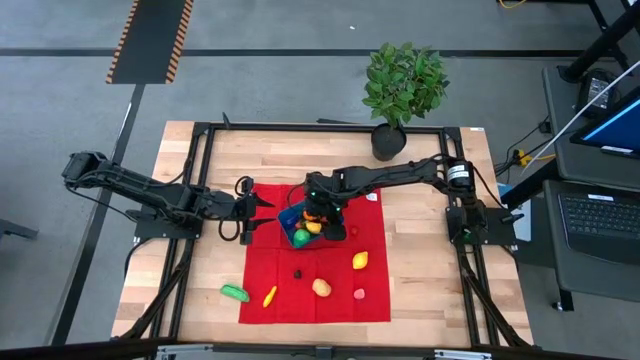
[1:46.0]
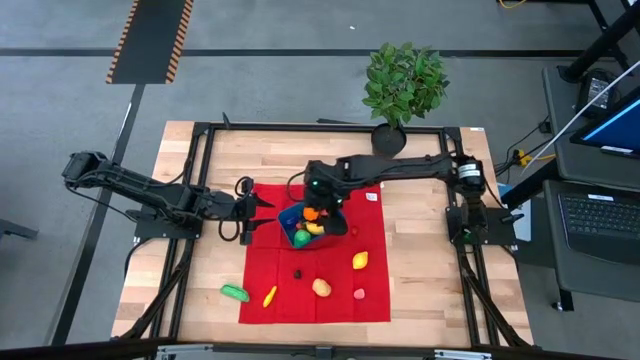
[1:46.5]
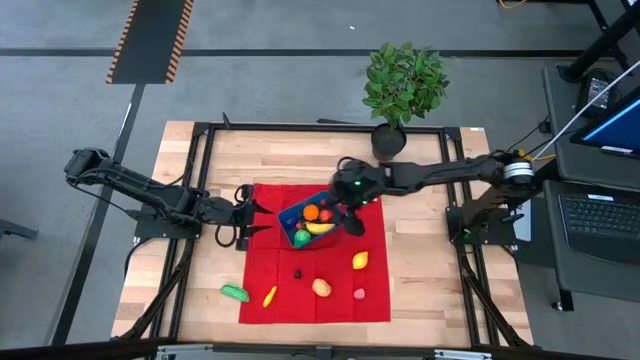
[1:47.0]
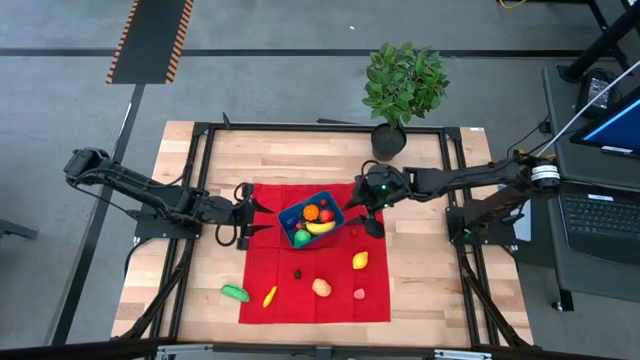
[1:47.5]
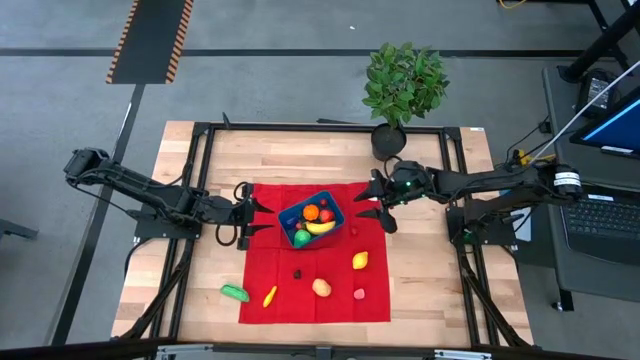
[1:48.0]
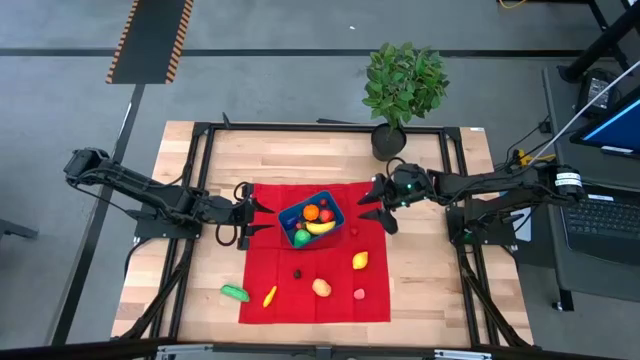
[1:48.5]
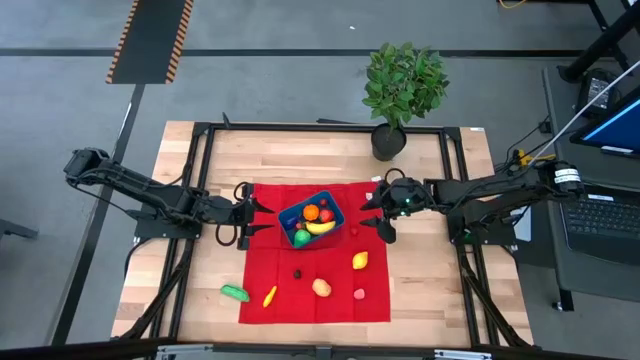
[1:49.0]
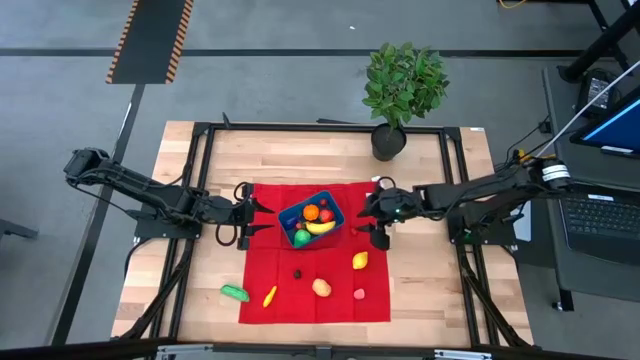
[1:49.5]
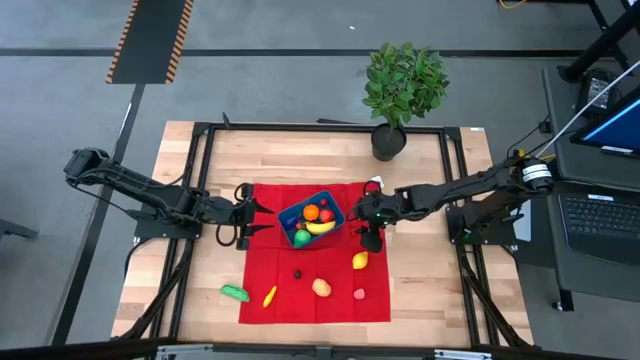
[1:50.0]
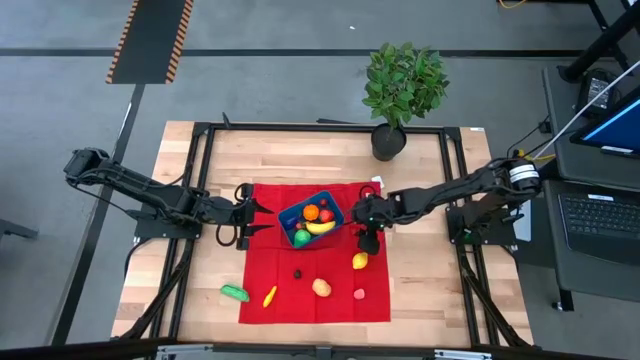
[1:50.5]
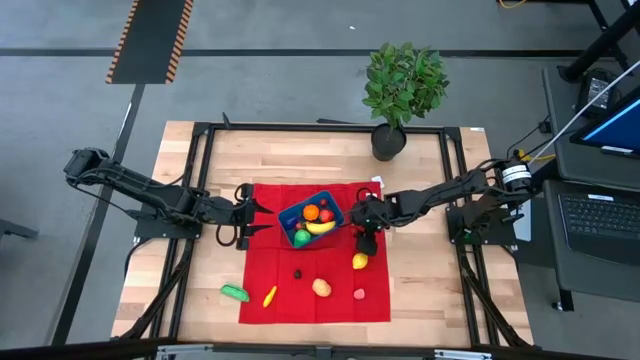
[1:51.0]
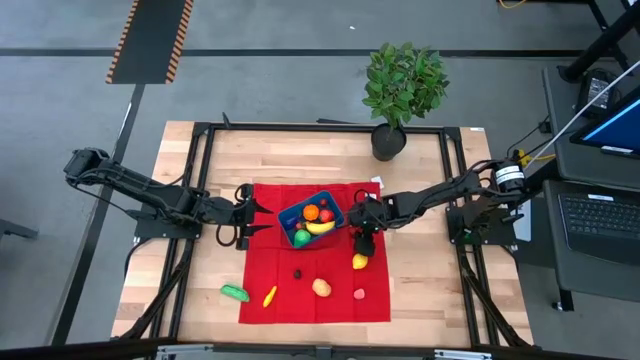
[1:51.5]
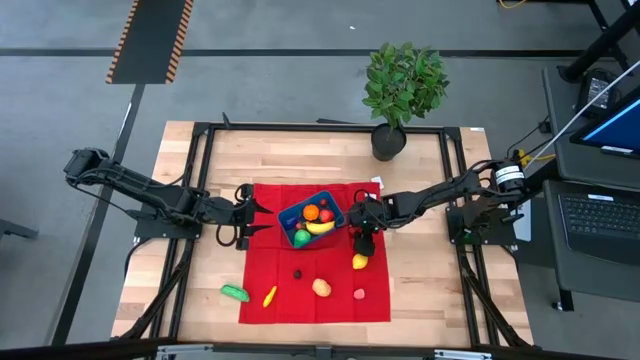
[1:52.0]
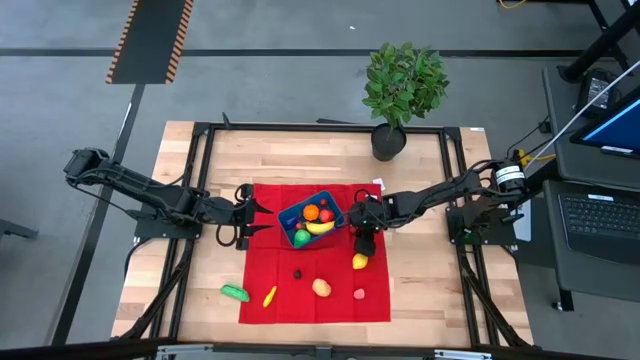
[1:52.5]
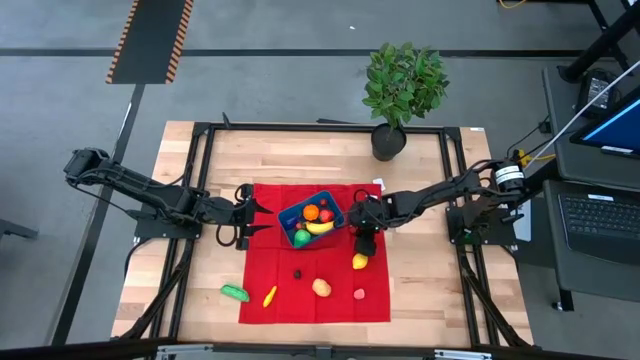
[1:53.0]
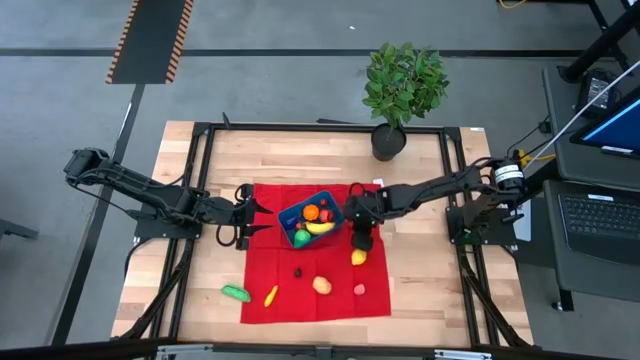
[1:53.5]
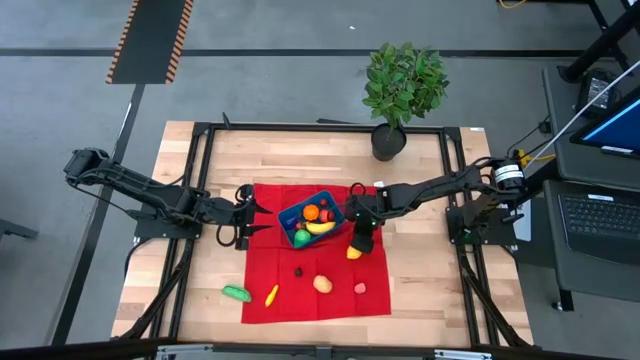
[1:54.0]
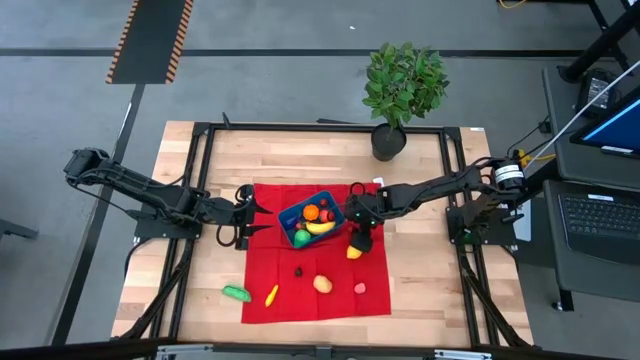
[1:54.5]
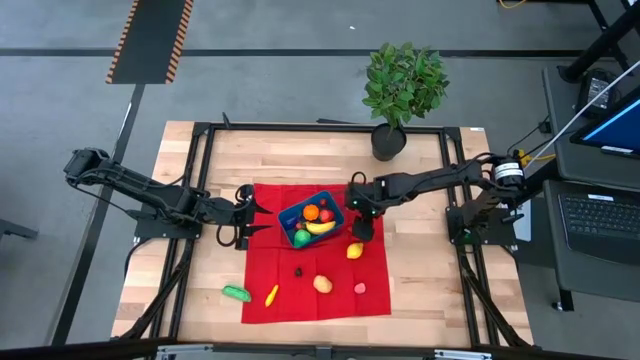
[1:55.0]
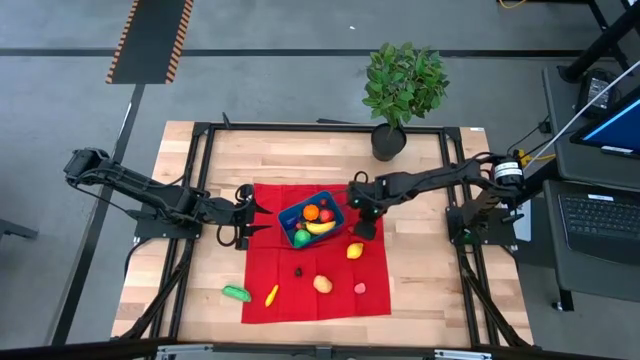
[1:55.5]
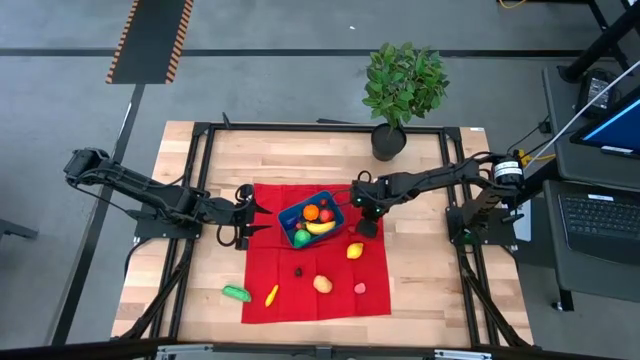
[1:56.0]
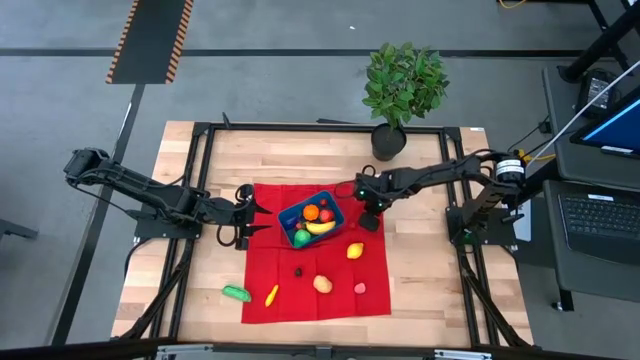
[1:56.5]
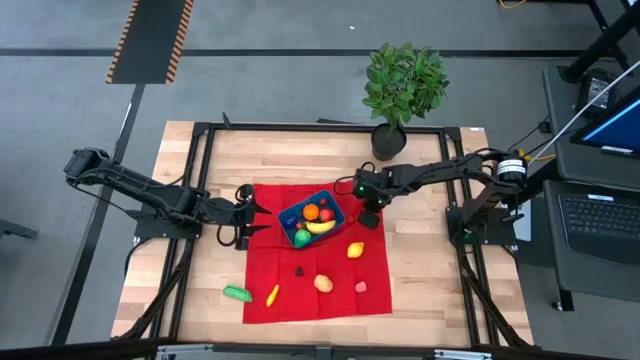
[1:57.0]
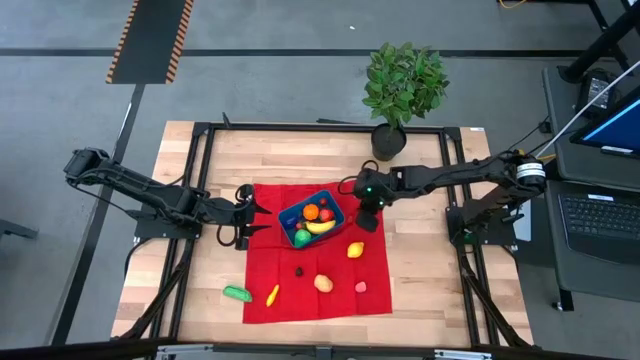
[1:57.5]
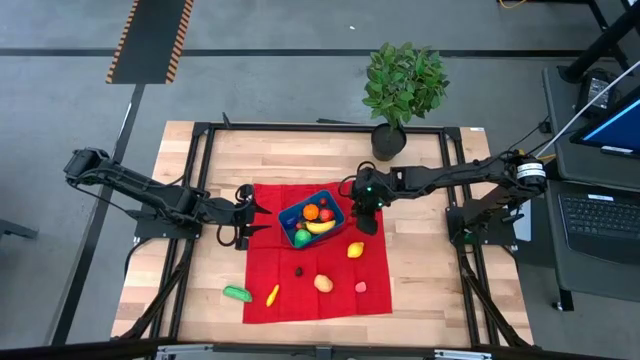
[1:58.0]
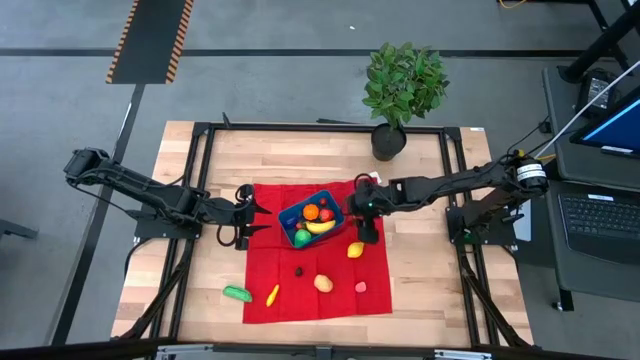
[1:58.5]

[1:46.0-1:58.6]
Task: Pick and placing Produce into tupperware
Put the raspberry into the blue bin

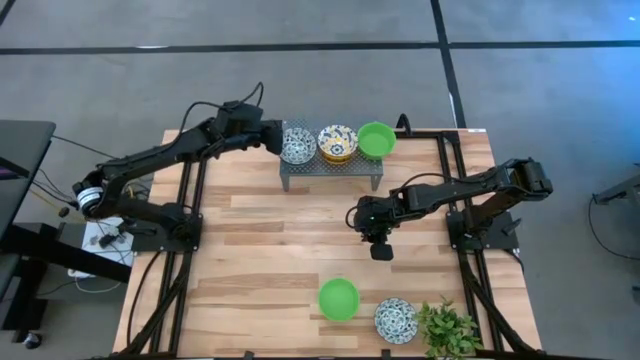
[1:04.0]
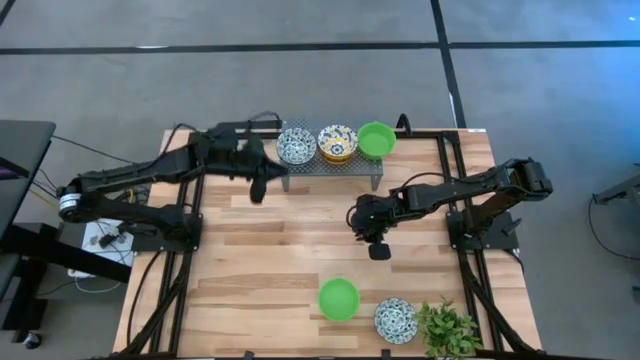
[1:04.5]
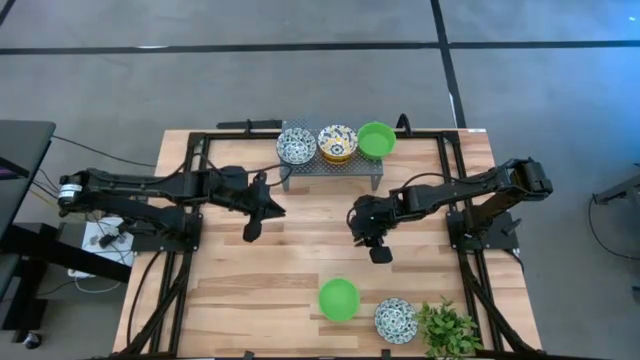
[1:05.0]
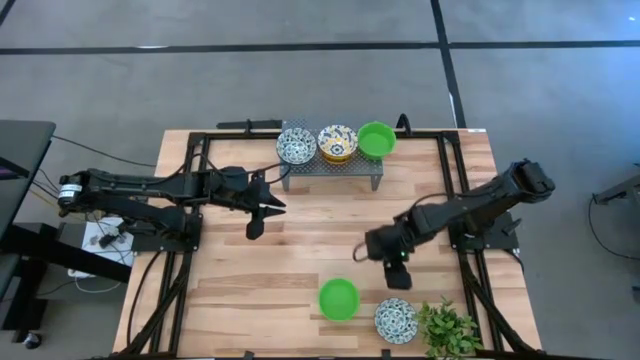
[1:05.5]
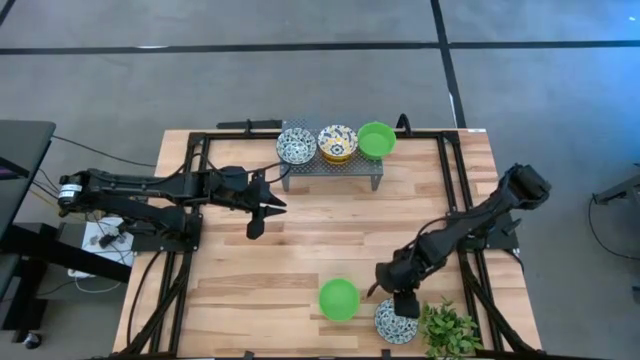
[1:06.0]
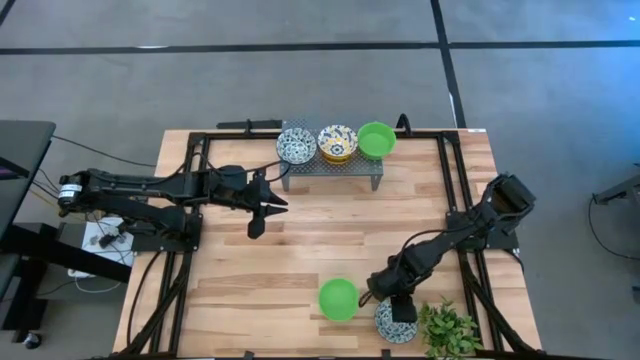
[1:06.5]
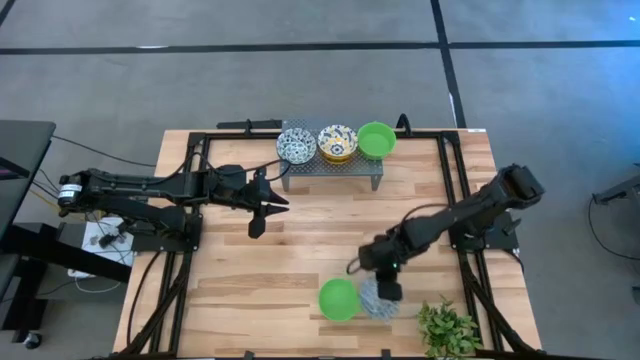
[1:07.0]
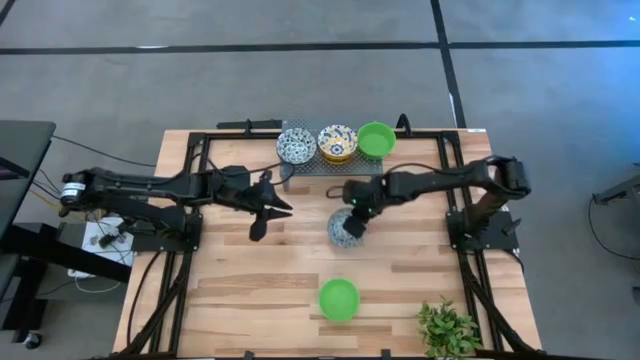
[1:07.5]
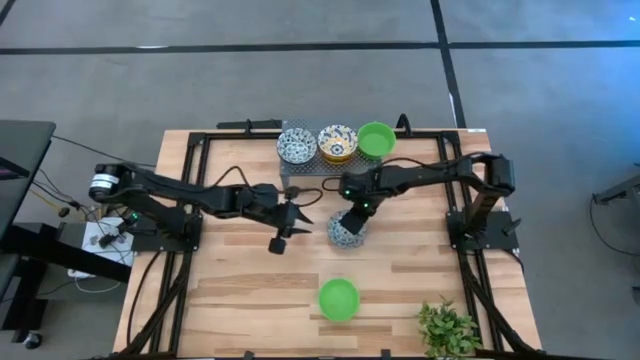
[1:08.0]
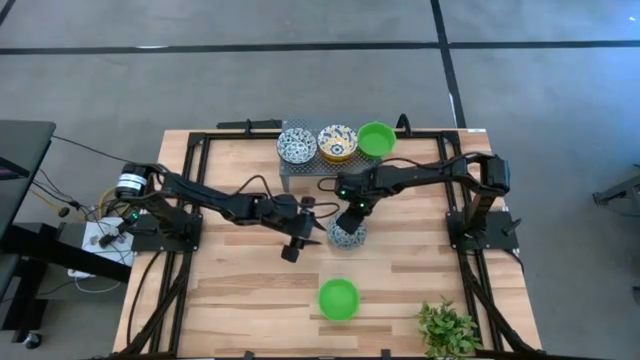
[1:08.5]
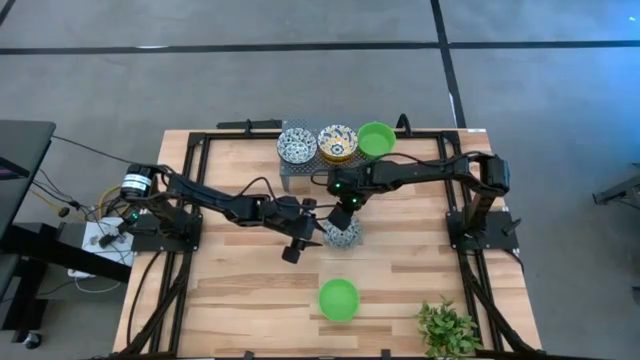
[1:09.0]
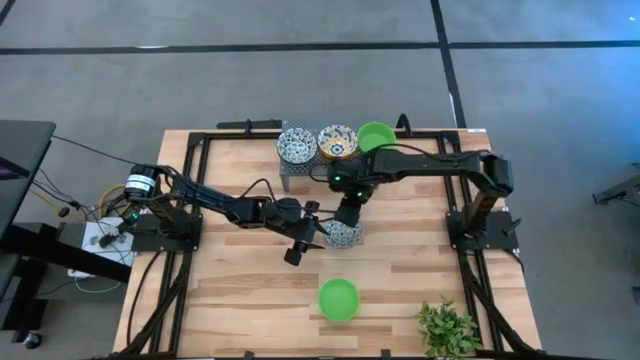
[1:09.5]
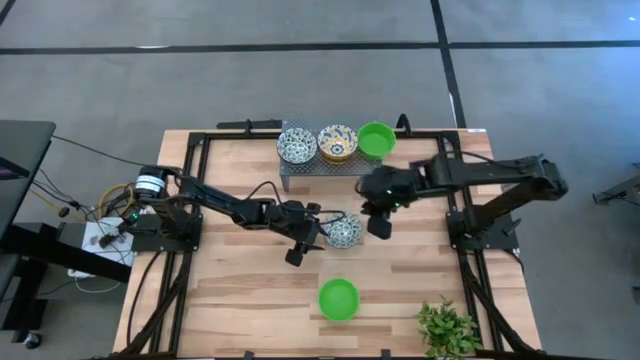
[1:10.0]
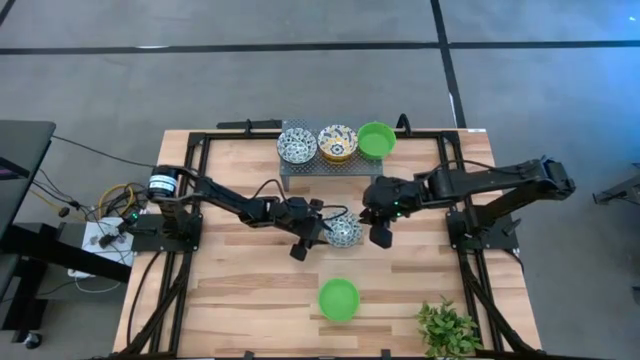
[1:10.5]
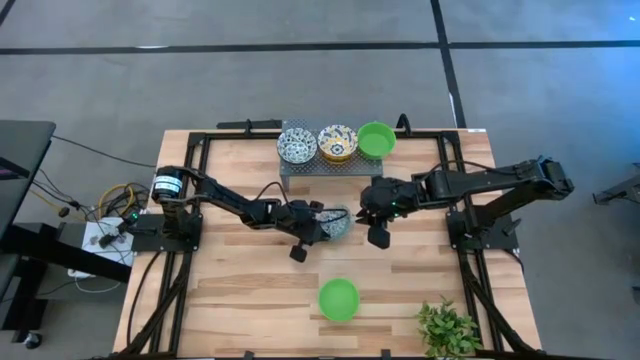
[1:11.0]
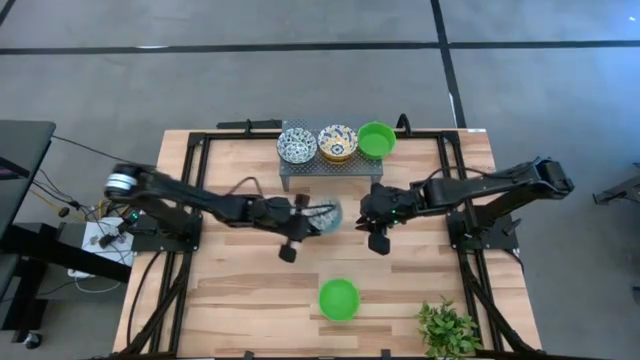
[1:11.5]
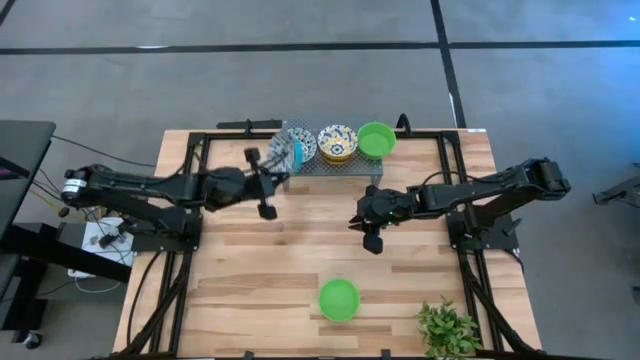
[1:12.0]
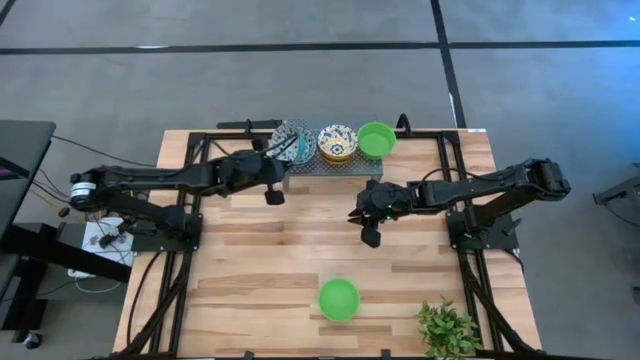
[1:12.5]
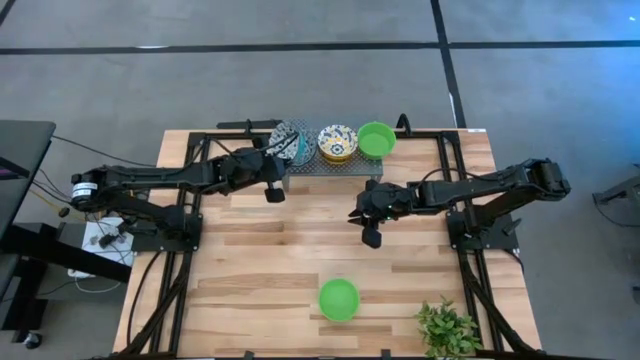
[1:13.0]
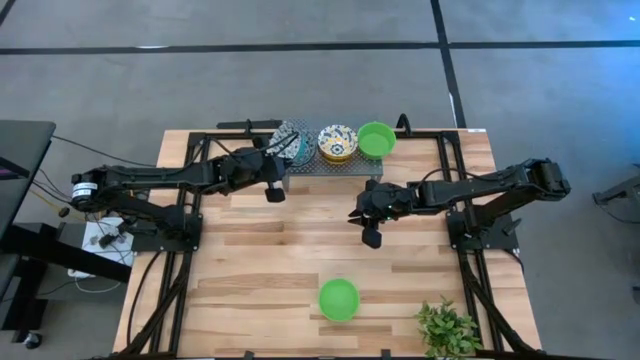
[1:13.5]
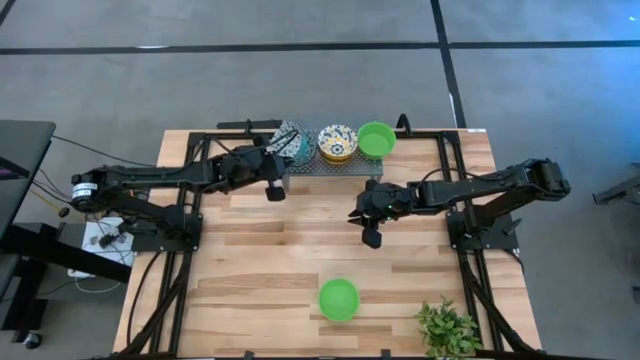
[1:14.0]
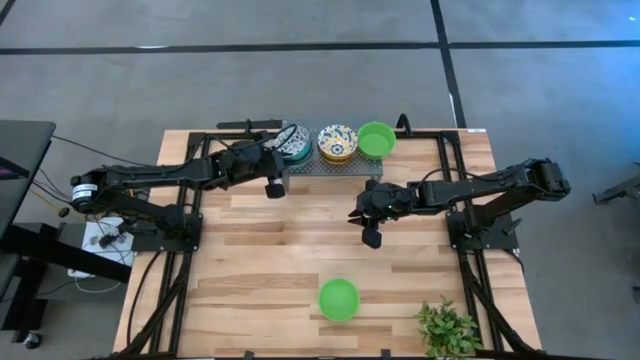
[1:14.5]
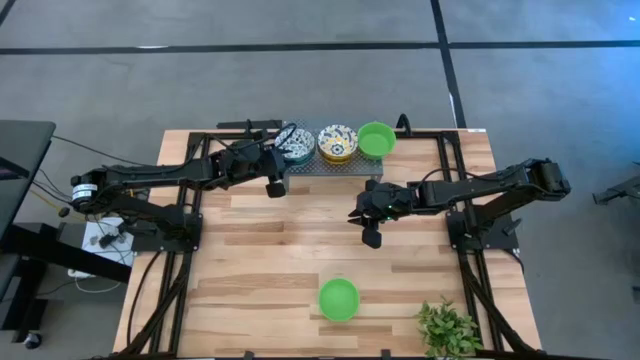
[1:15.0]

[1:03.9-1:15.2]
Task: Pick & Place Mini bowls
Stack the blue patterned bowl on the blue patterned bowl on the shelf
